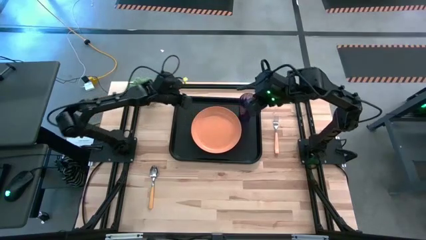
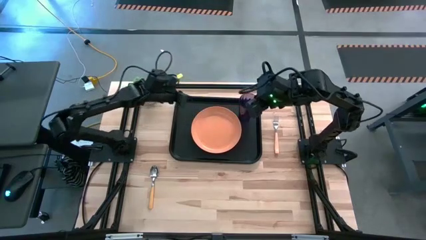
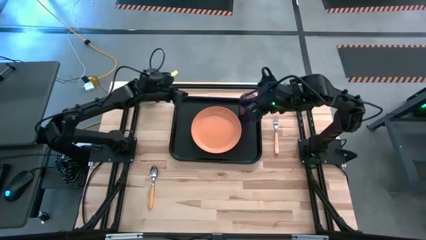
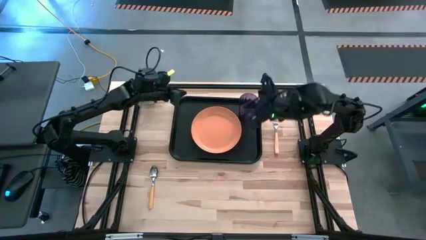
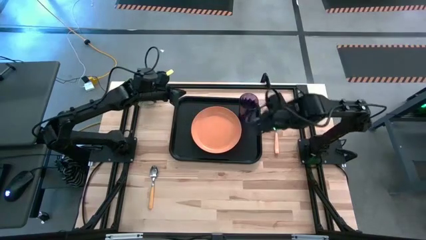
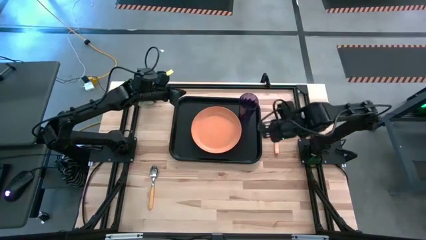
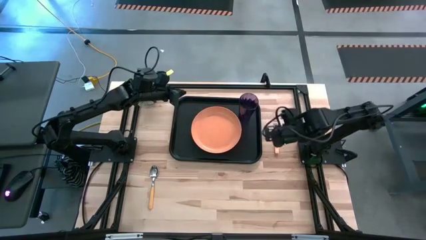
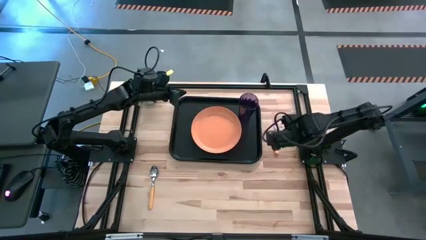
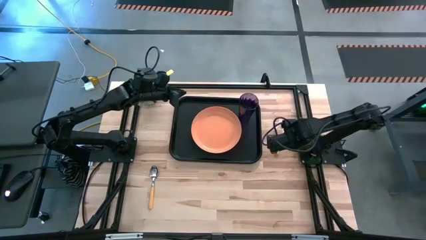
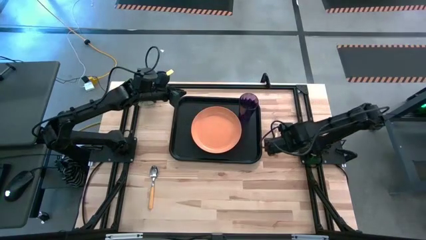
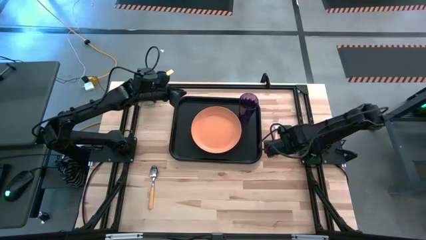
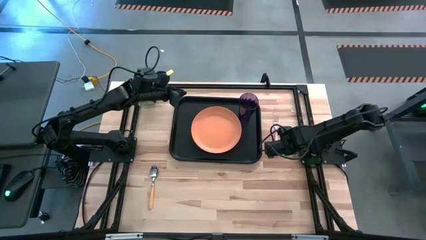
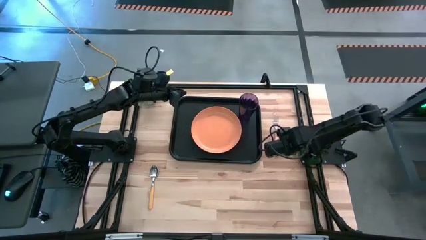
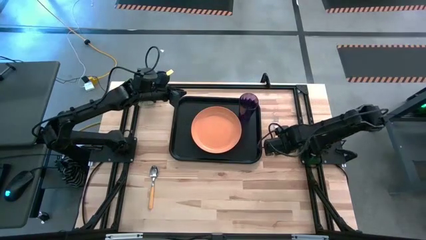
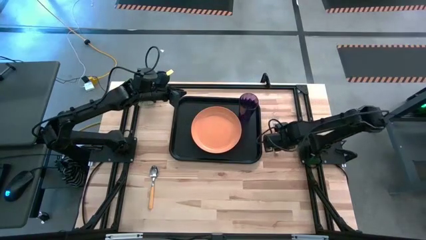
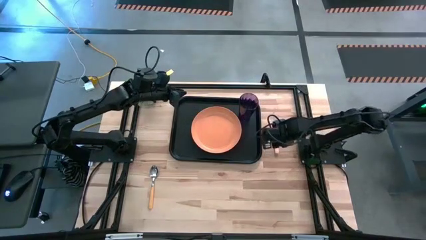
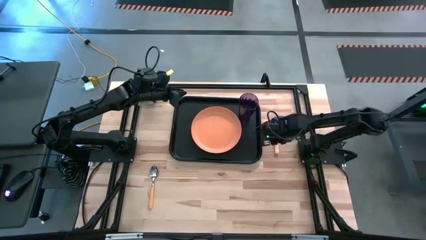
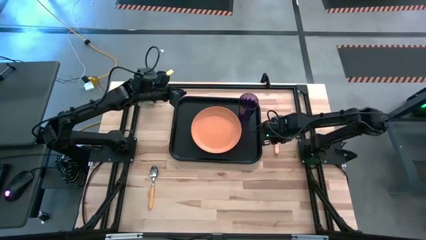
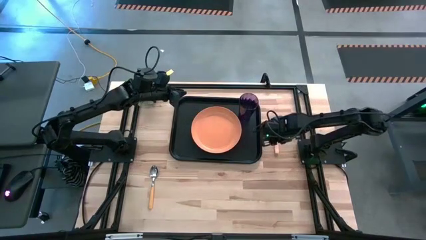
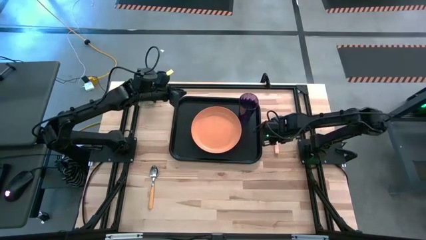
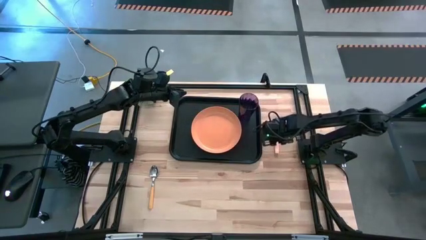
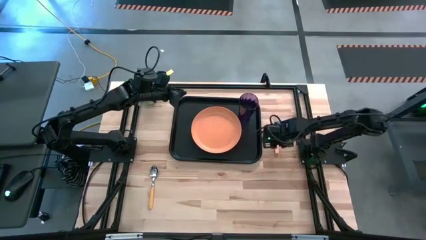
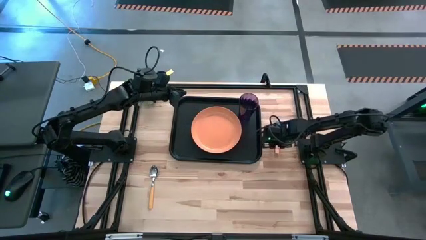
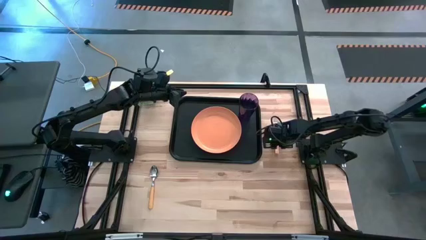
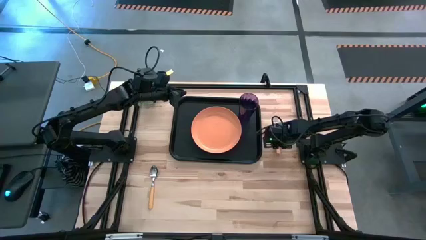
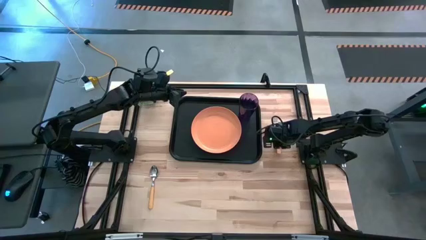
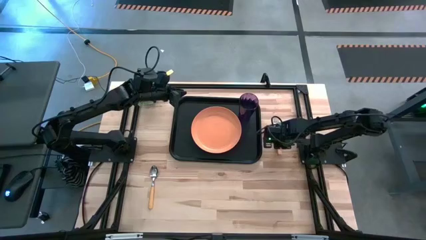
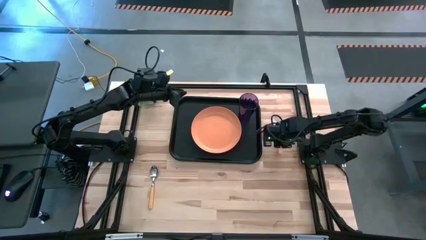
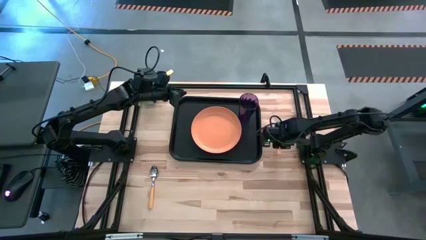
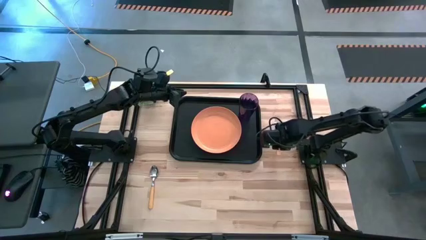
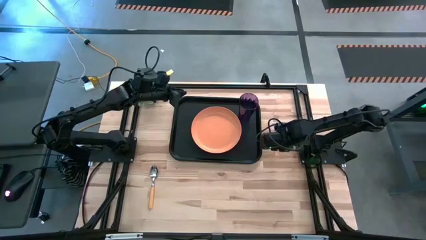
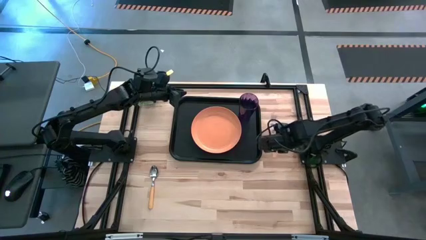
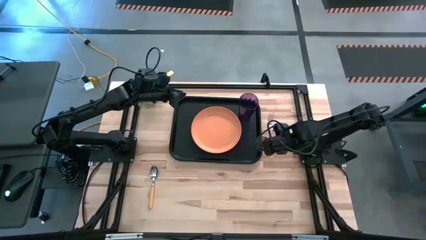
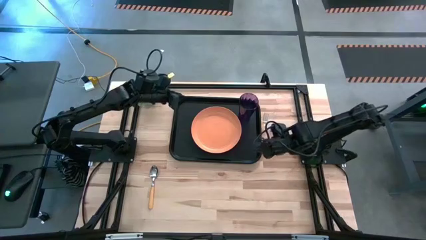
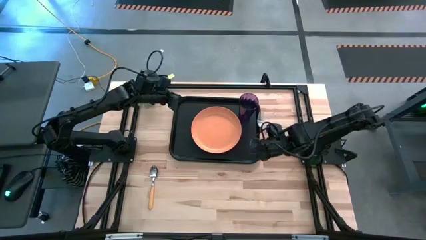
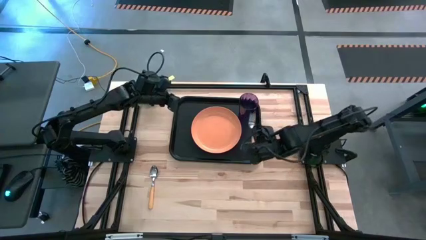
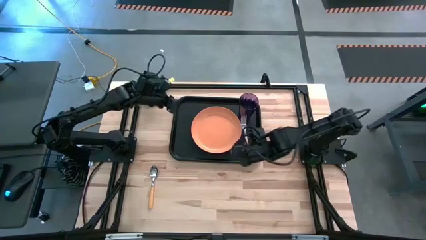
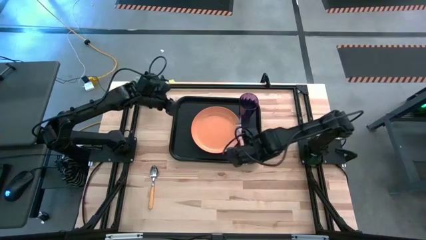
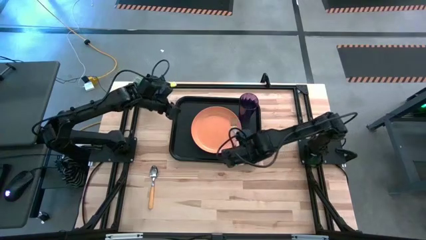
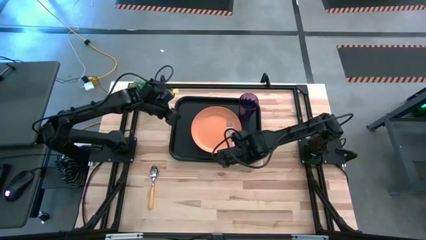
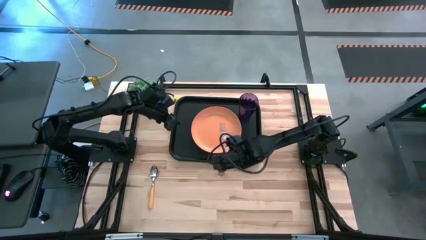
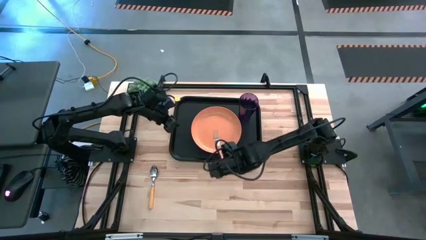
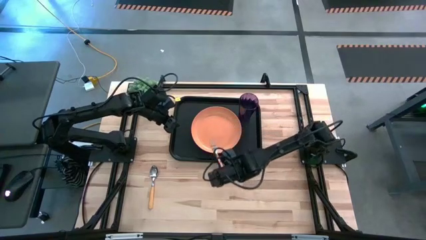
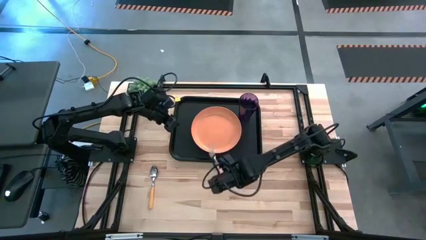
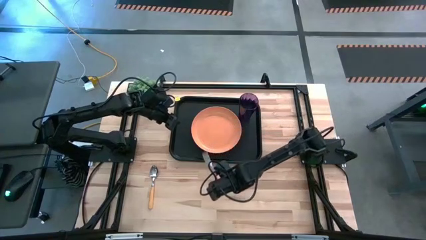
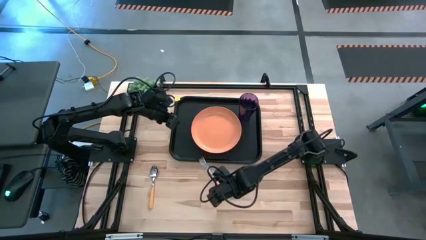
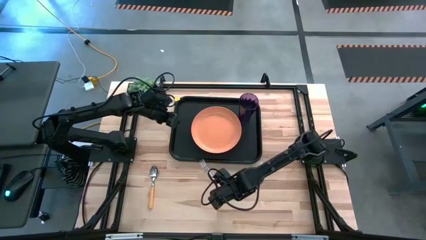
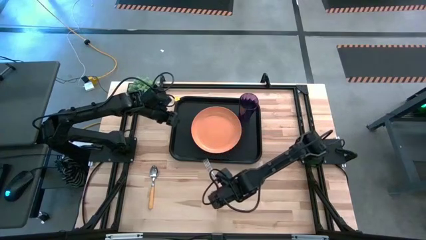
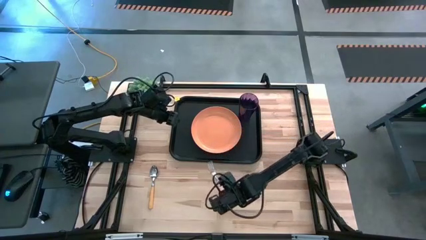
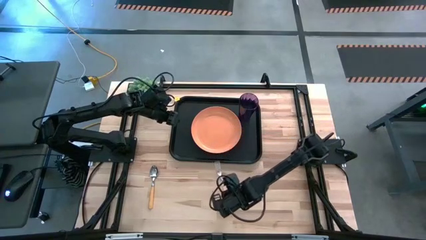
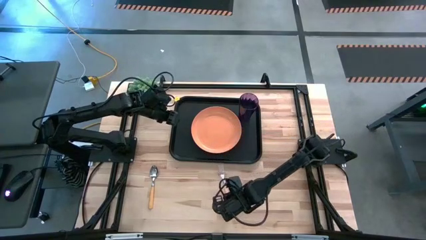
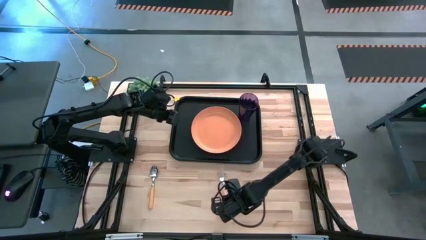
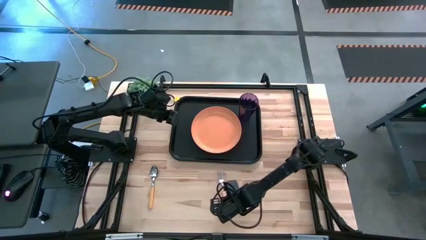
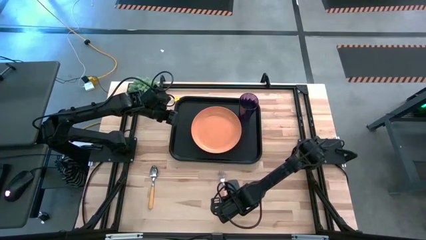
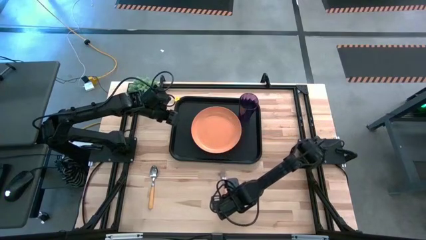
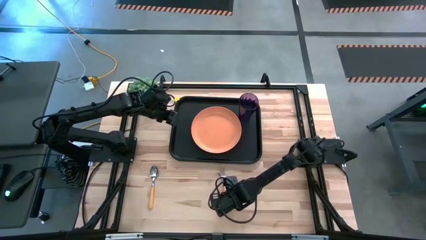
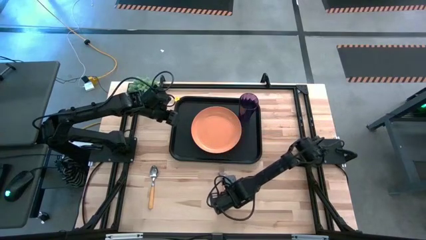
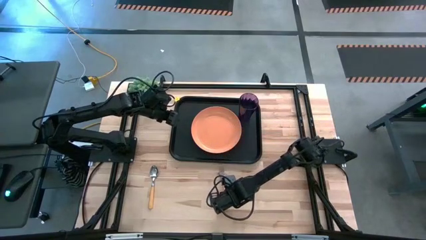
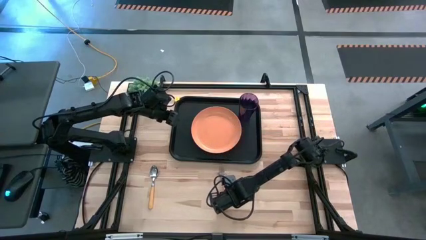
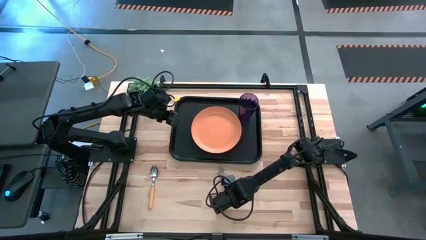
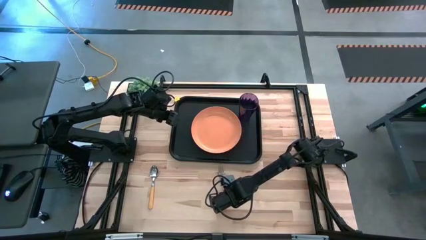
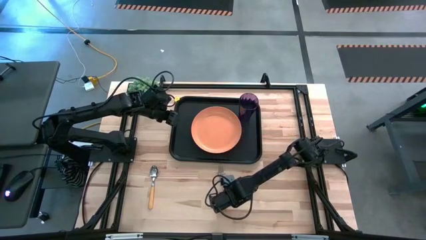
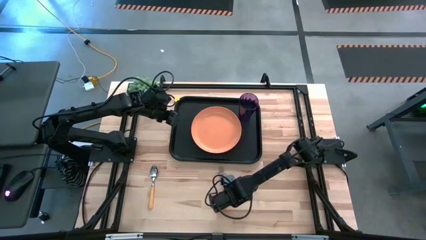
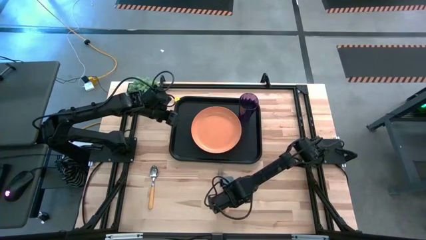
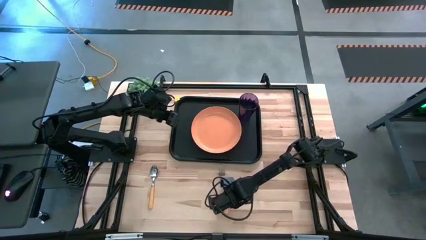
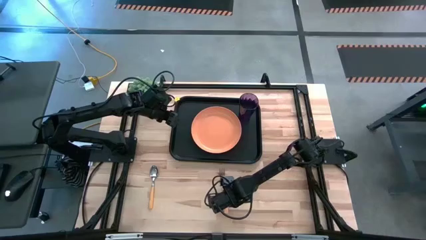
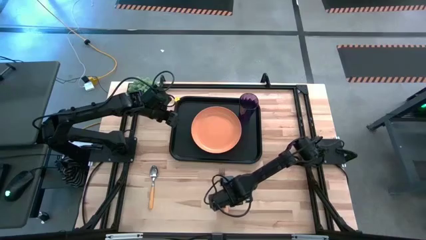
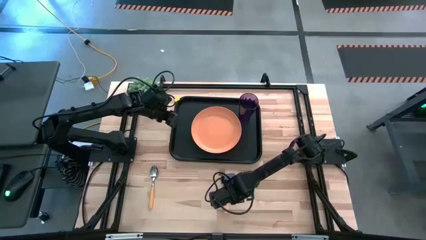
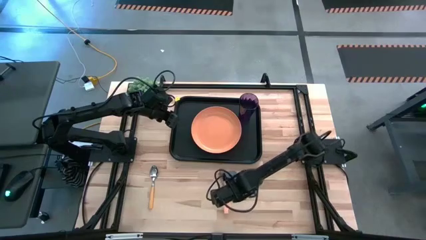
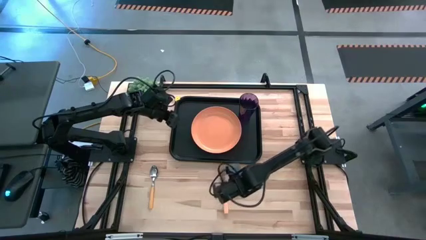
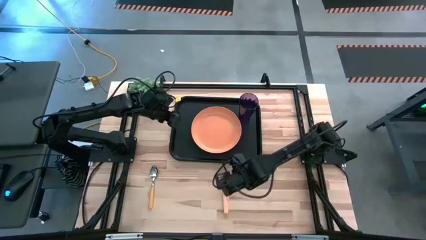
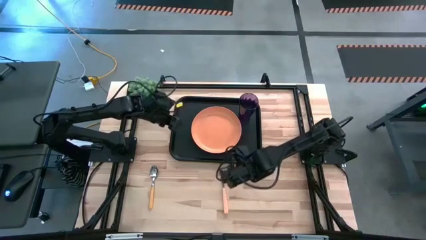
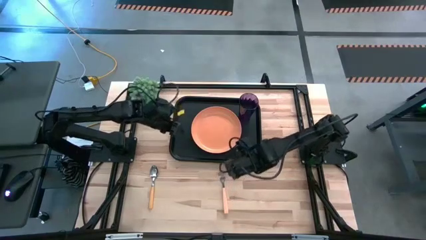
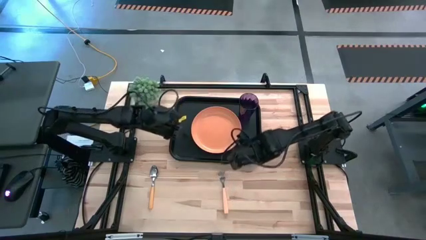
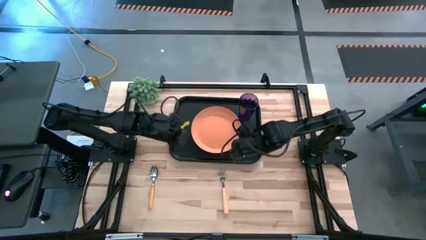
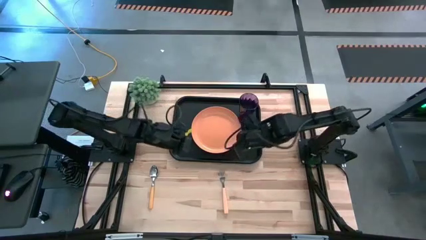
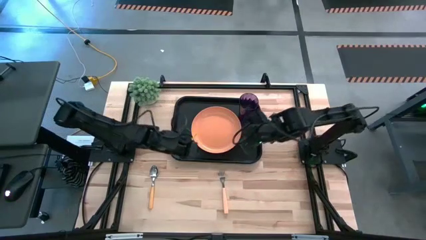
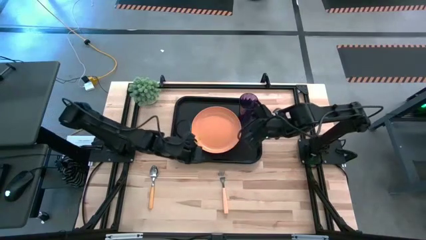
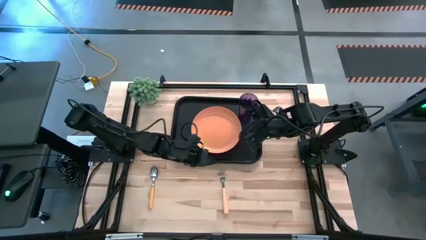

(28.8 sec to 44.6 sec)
Task: Pick and place plate/cup/fork/spoon on tray
Put the orange fork on the black tray to the left of the orange plate
